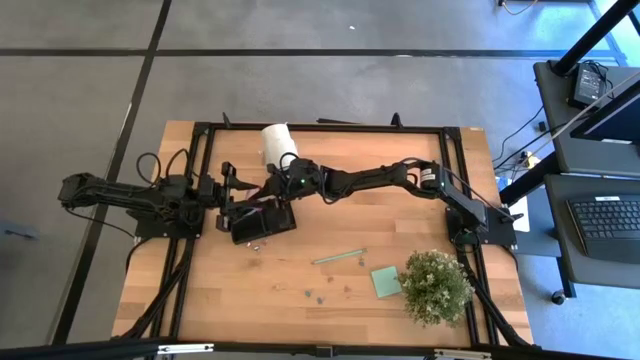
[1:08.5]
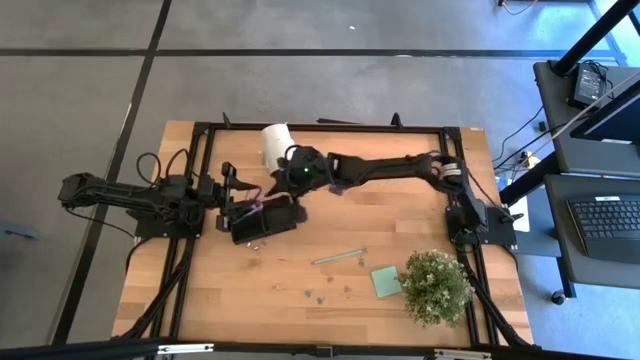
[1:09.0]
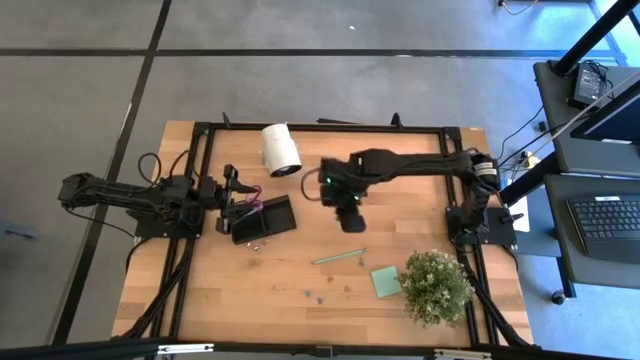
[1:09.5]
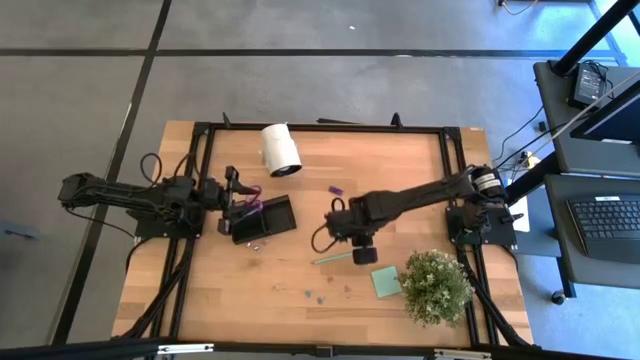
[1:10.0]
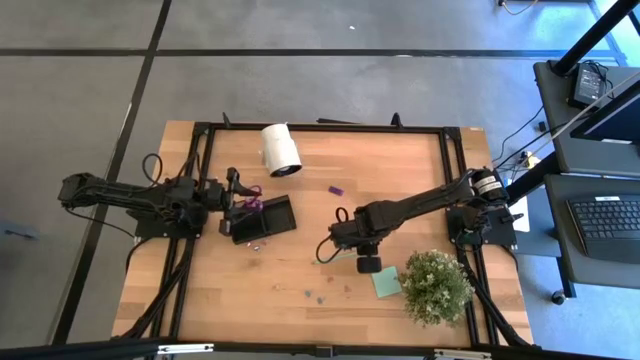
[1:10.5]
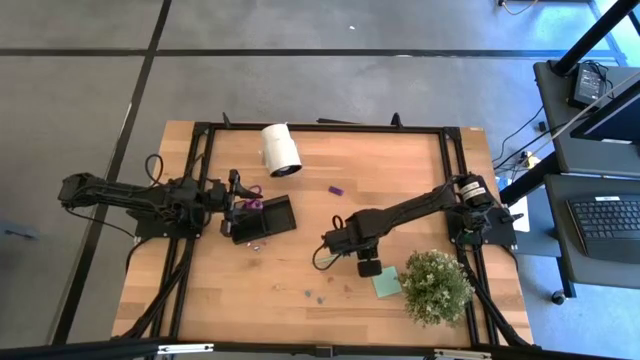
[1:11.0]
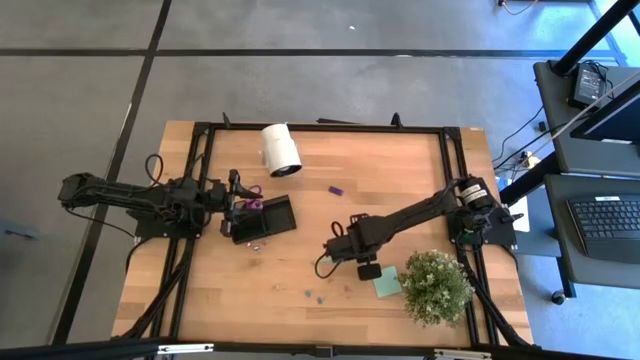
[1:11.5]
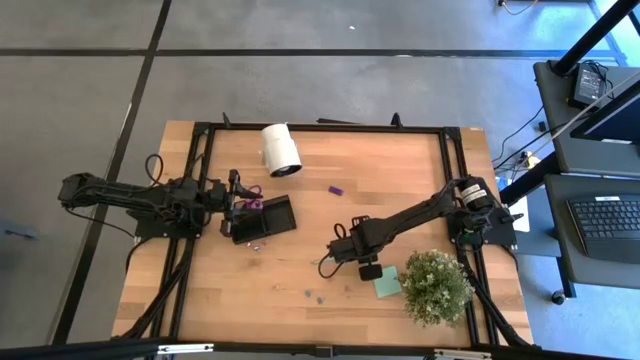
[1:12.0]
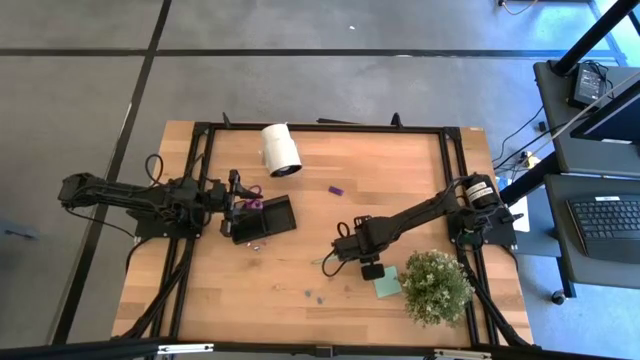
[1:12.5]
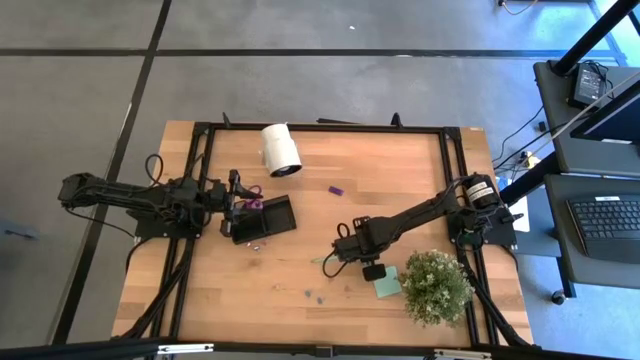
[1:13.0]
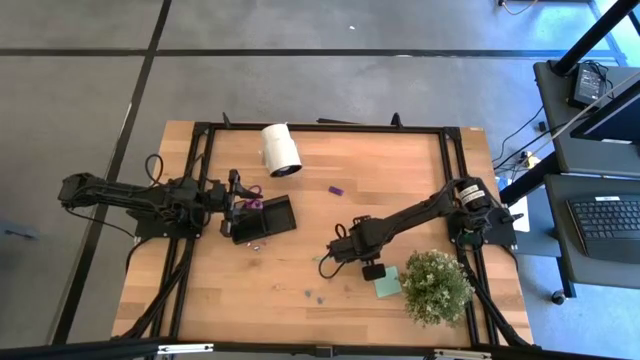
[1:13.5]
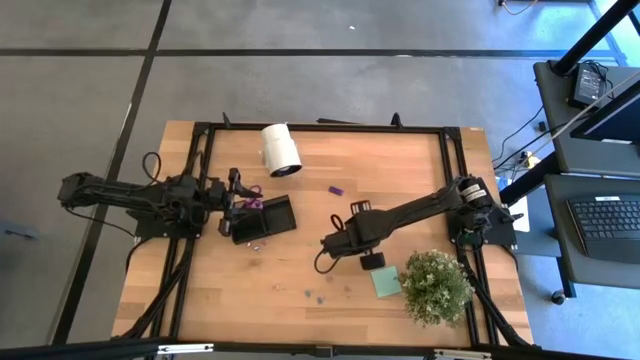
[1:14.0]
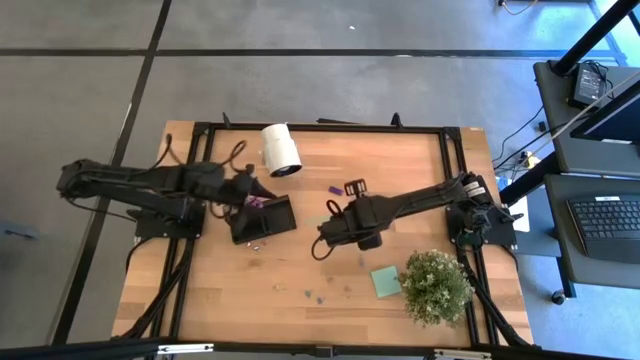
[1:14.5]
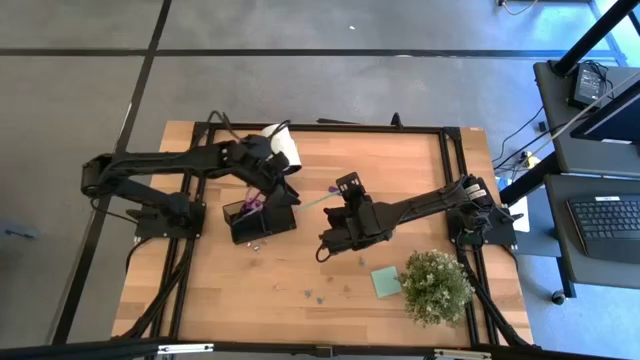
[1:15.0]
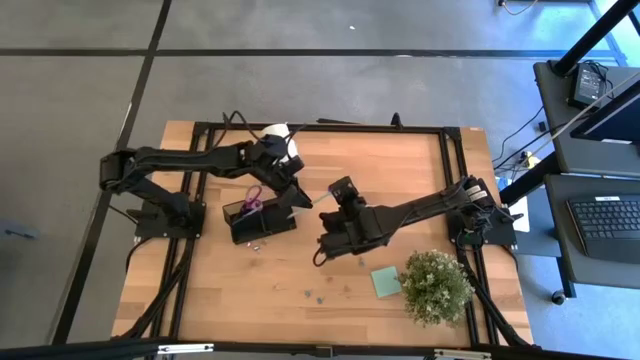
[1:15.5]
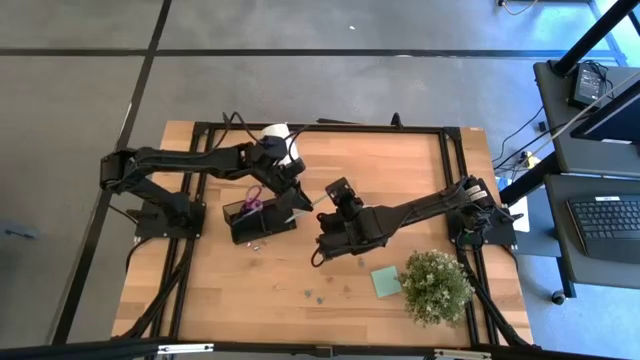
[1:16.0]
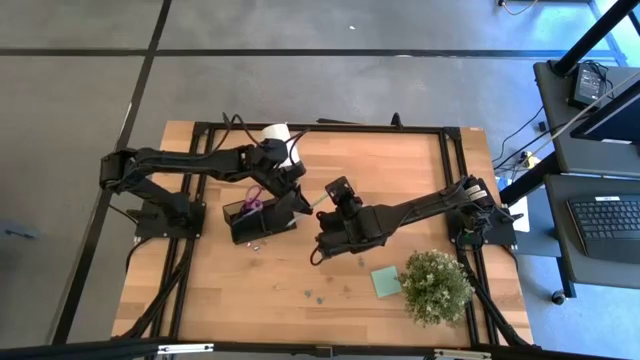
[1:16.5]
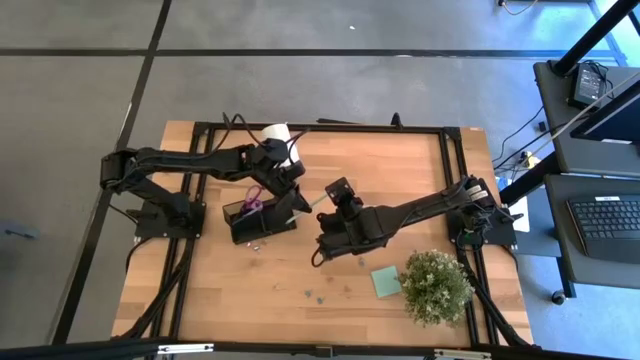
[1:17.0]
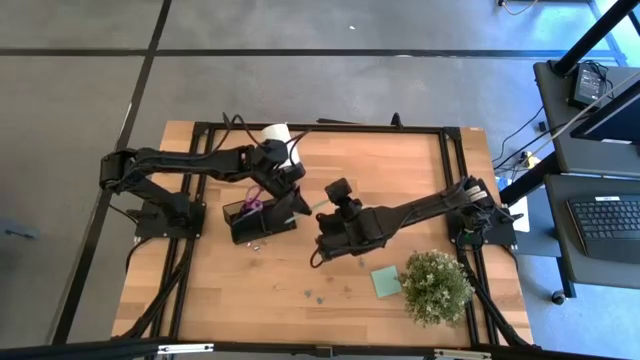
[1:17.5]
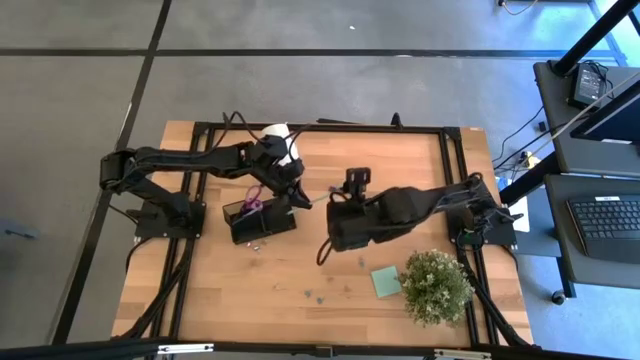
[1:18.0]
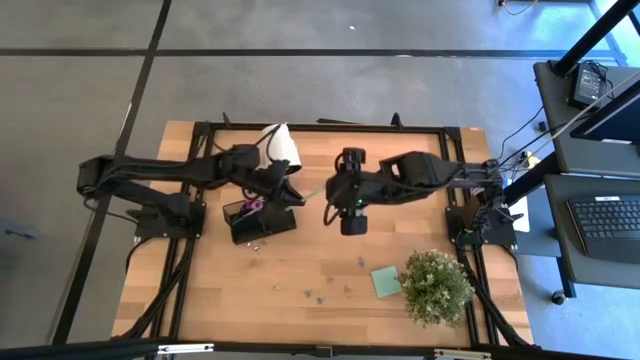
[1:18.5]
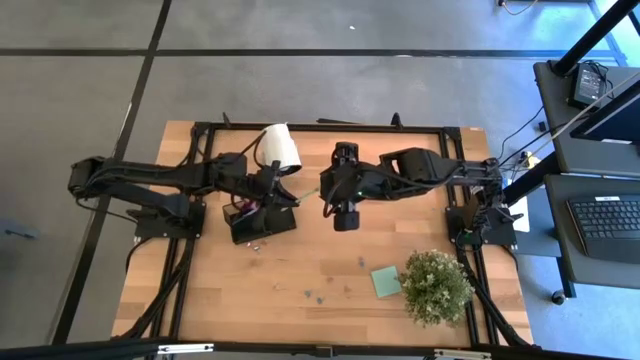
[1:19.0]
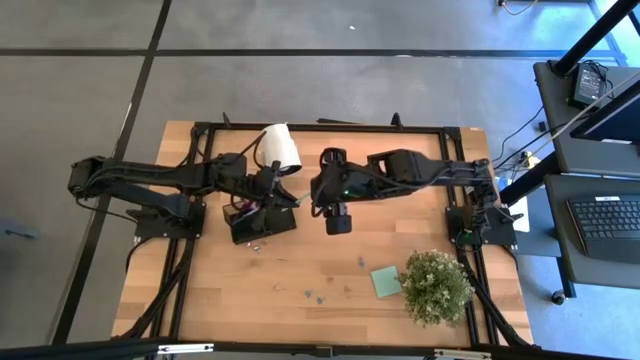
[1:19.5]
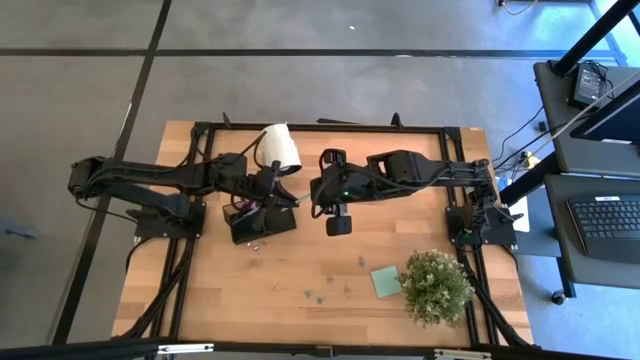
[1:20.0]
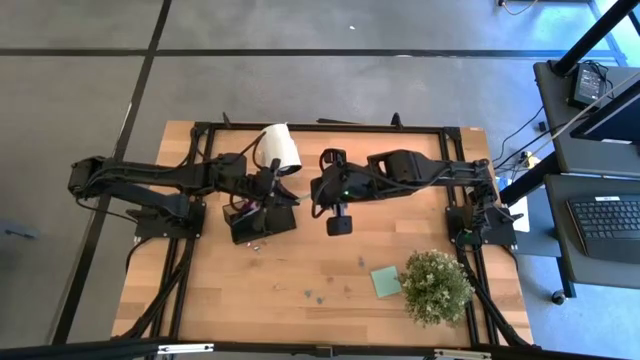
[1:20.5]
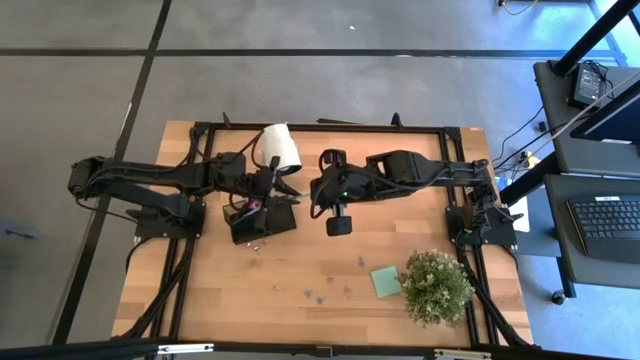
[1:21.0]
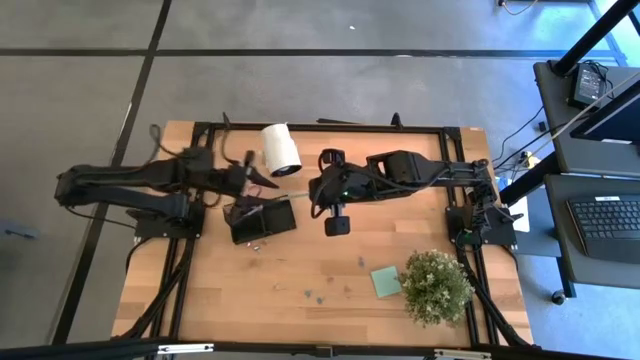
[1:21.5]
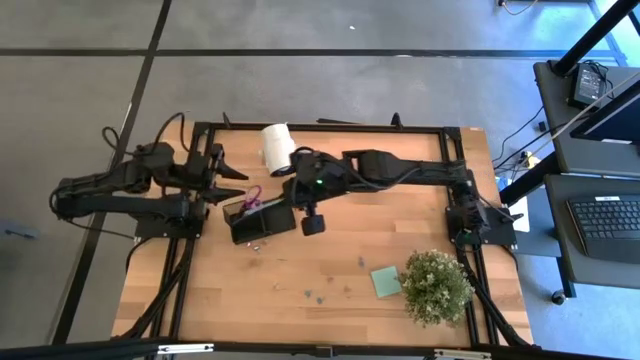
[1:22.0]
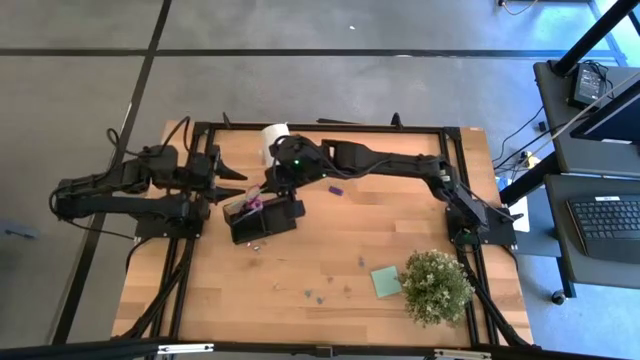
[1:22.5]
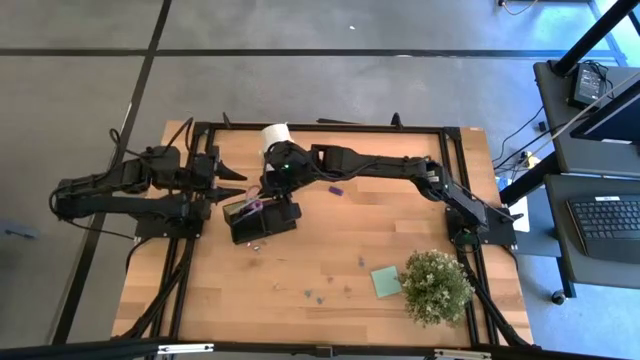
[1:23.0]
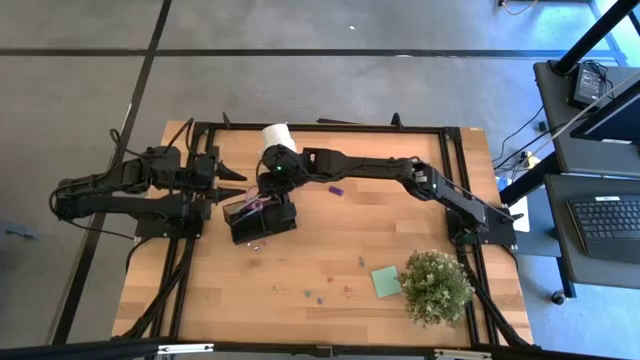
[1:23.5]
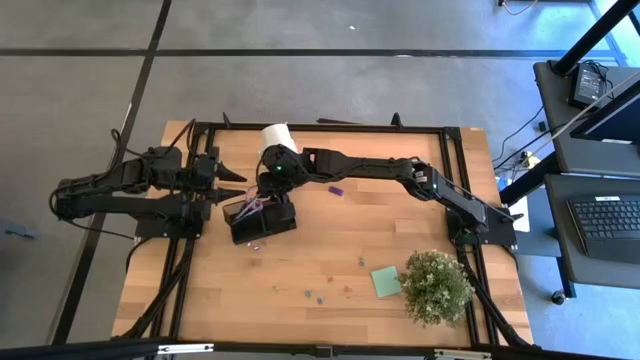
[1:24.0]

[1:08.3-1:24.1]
Task: Pick and place office supplies into organizer
Put the green pencil into the black desk organizer

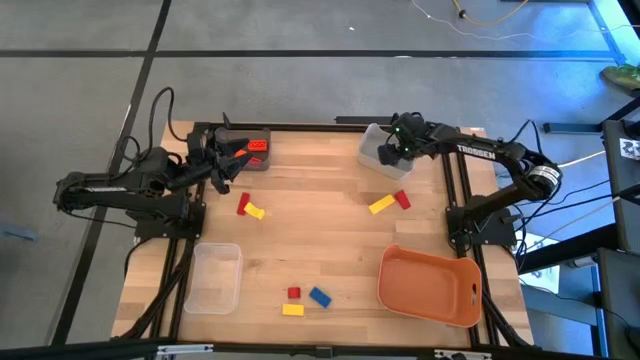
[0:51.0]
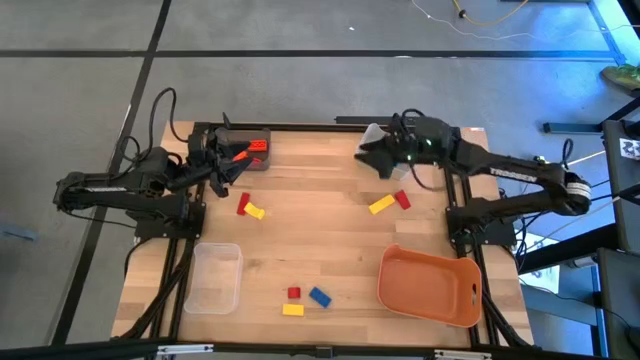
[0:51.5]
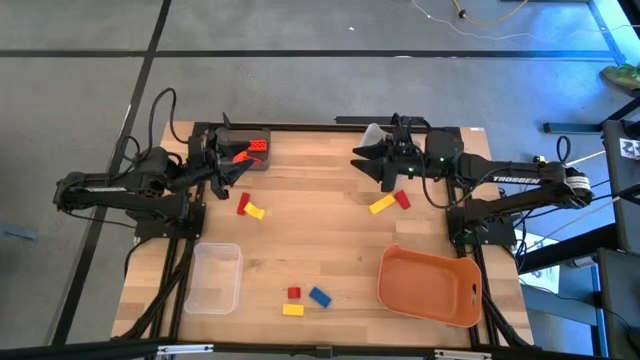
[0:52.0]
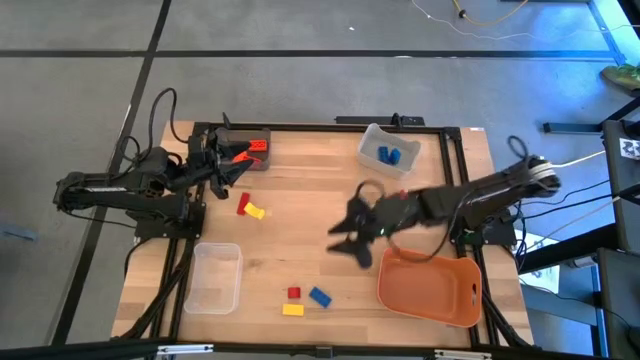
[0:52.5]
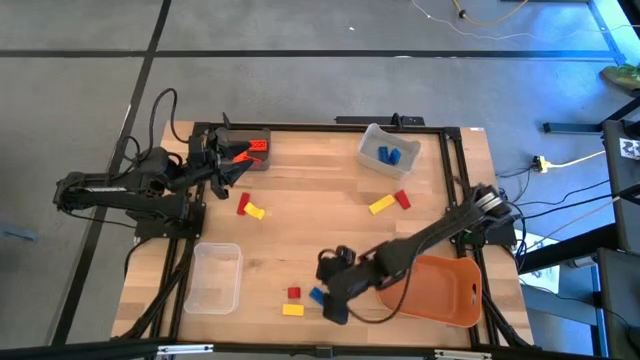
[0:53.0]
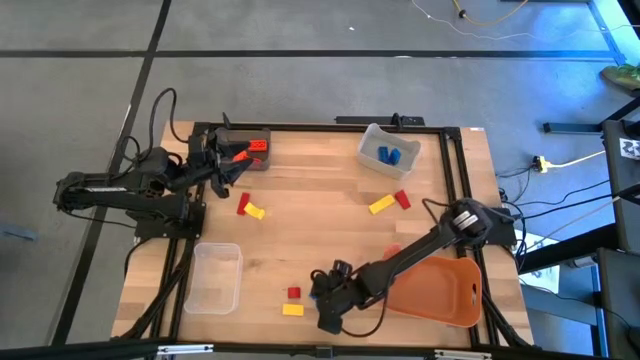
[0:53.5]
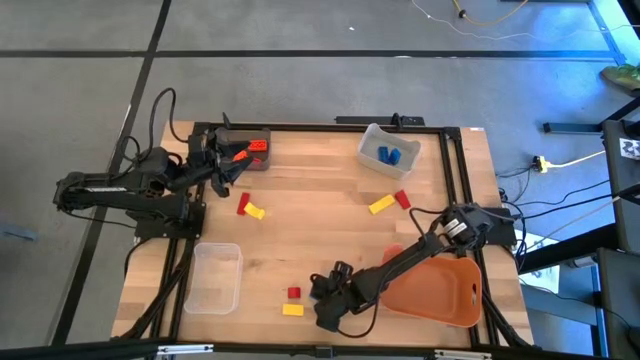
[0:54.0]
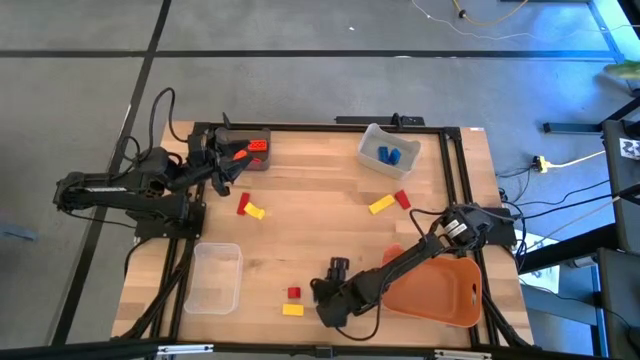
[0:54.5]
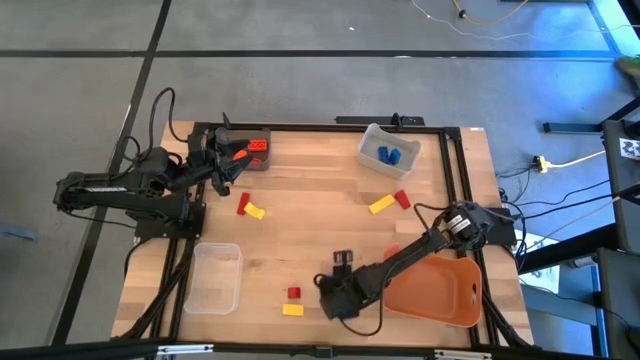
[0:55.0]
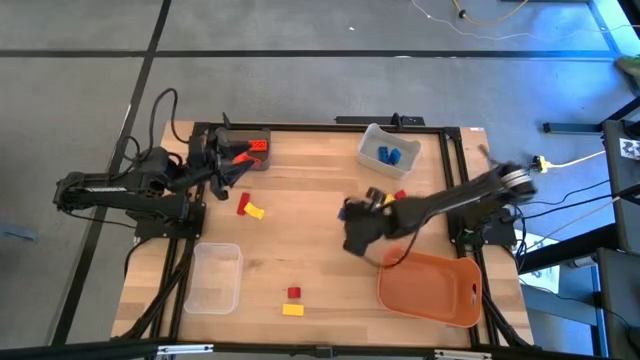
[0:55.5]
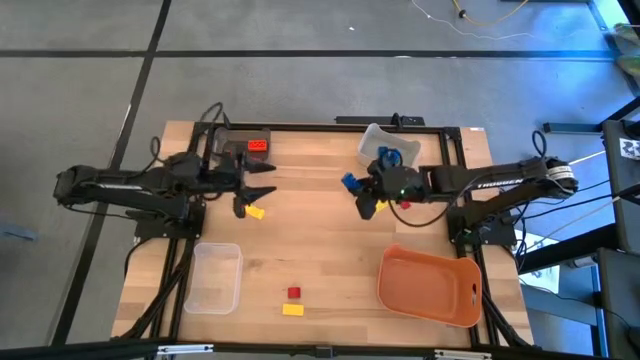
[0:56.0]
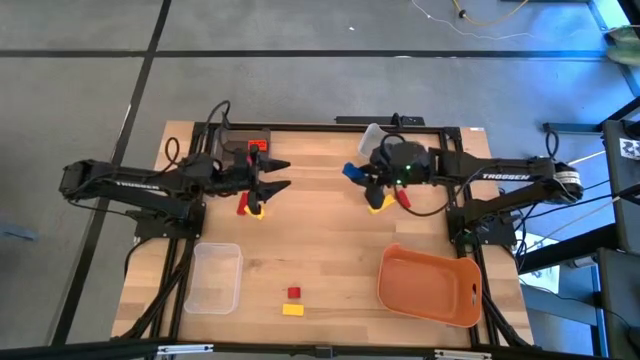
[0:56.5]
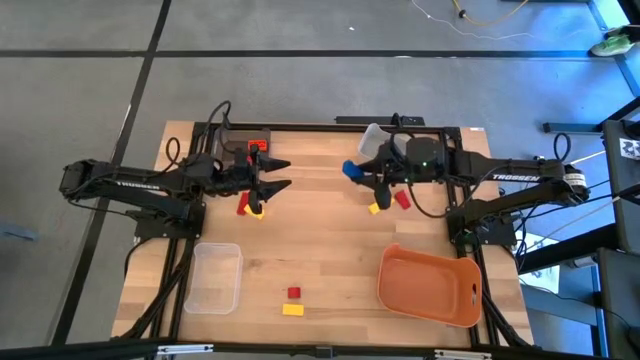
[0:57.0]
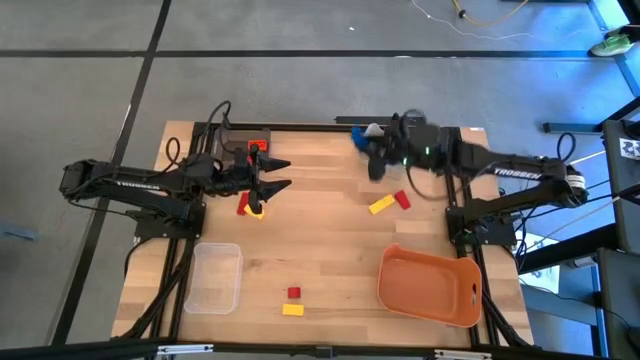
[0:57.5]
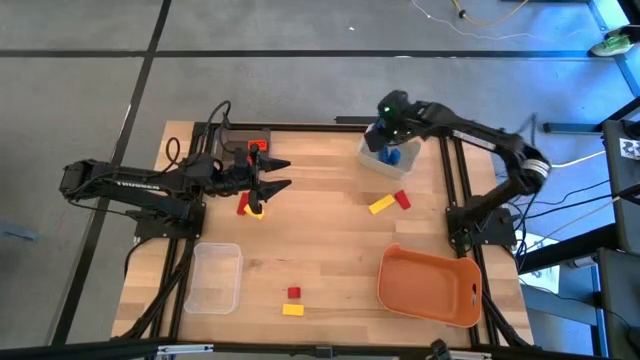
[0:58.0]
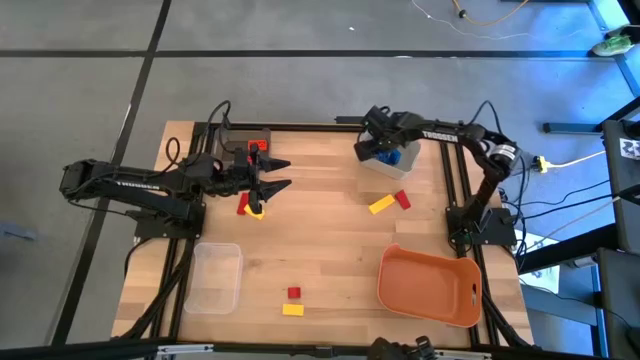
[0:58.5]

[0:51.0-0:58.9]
Task: Sort & place blocks by color
Put the blue gamepiece into the gray bin
